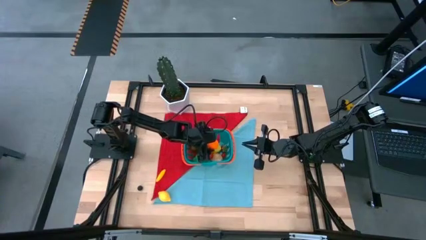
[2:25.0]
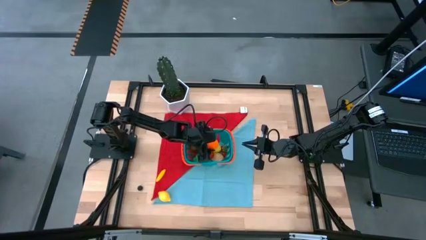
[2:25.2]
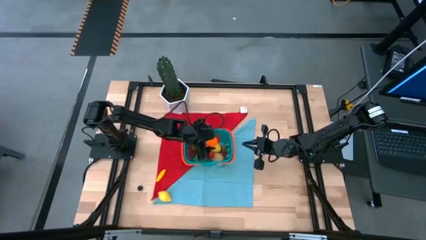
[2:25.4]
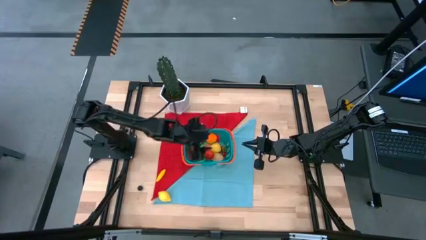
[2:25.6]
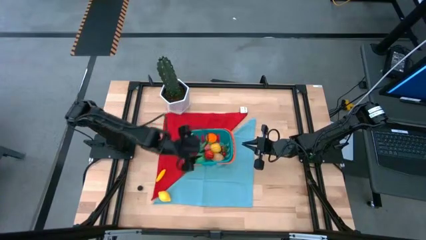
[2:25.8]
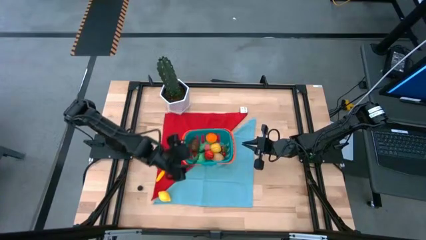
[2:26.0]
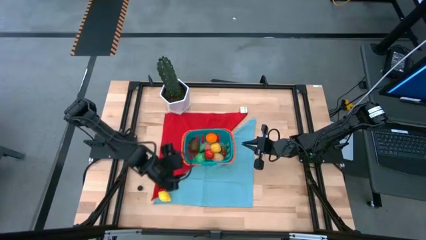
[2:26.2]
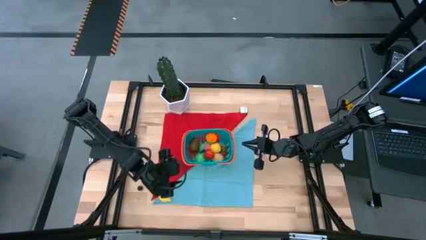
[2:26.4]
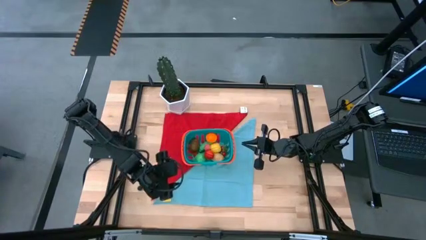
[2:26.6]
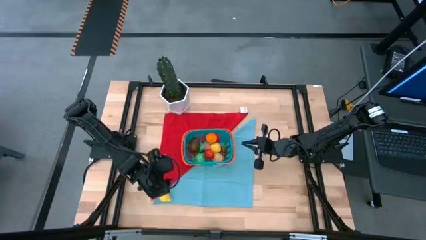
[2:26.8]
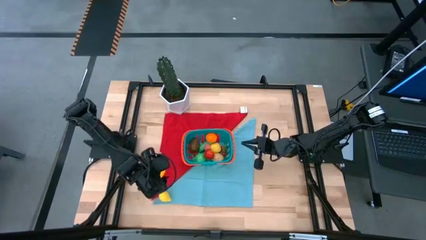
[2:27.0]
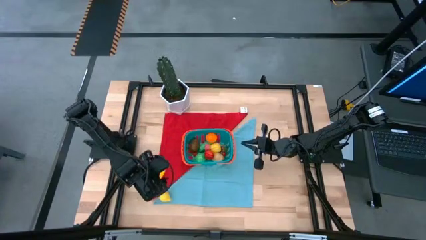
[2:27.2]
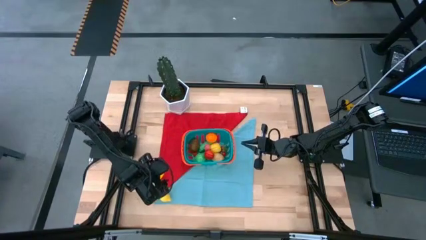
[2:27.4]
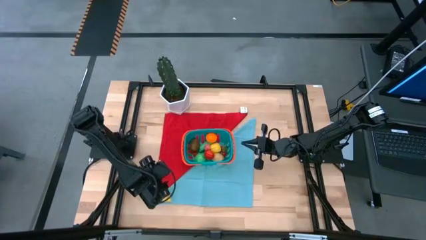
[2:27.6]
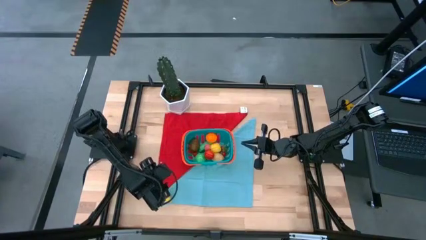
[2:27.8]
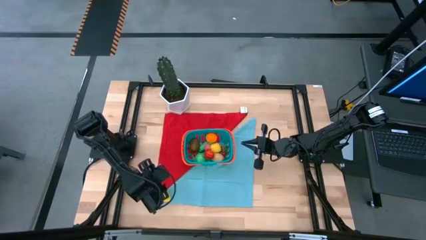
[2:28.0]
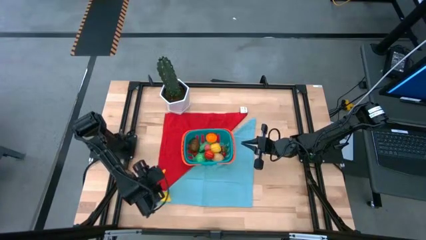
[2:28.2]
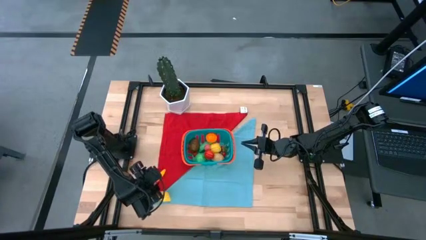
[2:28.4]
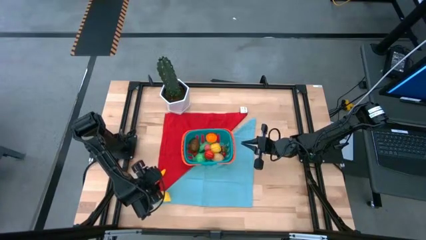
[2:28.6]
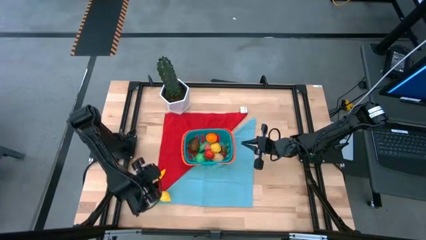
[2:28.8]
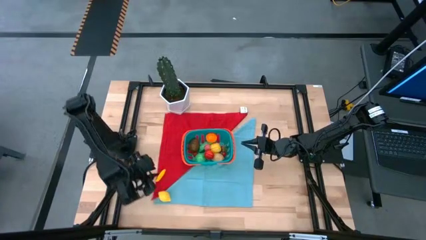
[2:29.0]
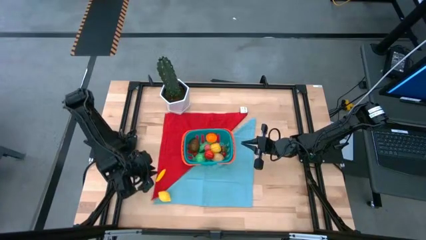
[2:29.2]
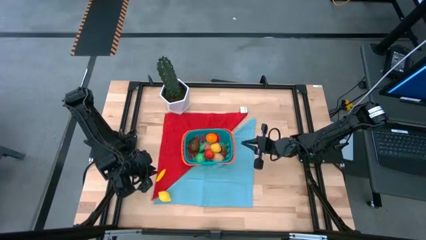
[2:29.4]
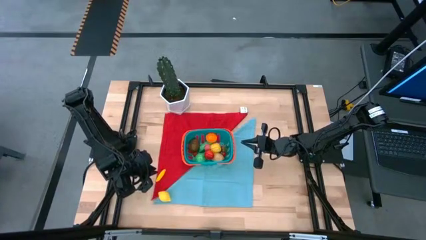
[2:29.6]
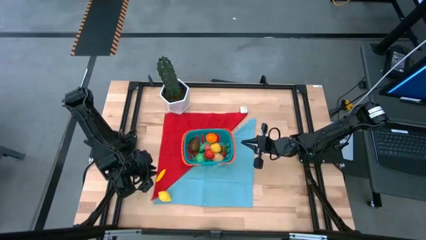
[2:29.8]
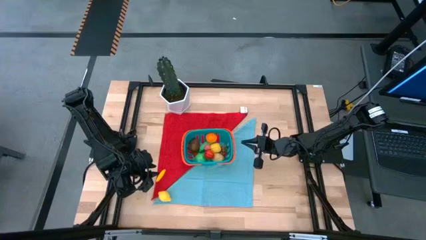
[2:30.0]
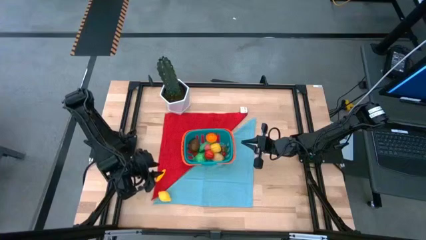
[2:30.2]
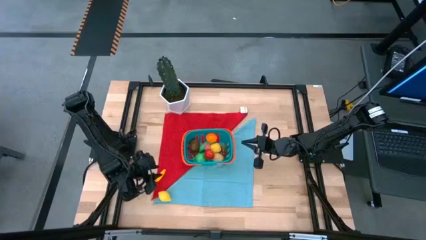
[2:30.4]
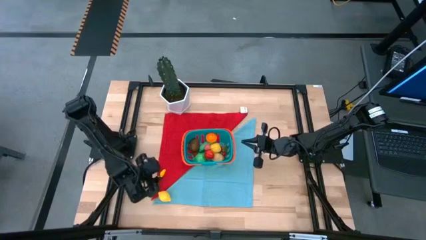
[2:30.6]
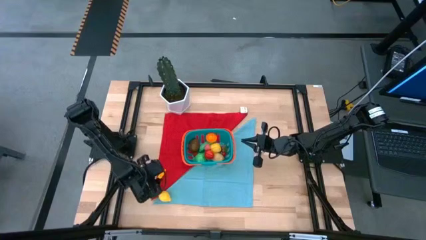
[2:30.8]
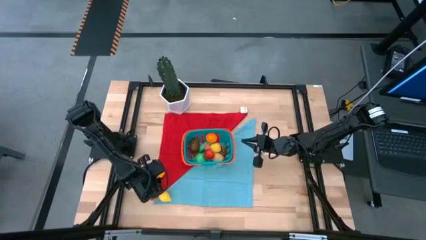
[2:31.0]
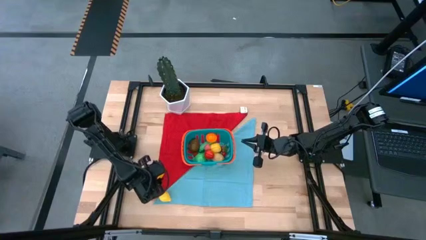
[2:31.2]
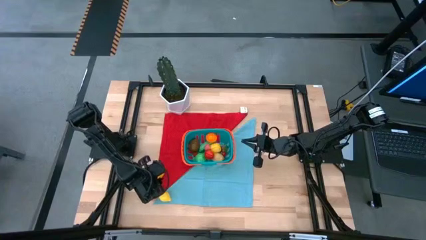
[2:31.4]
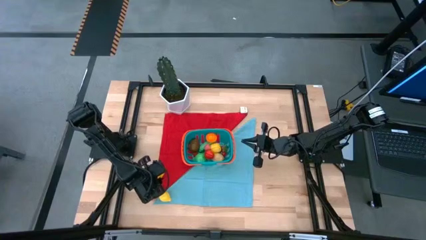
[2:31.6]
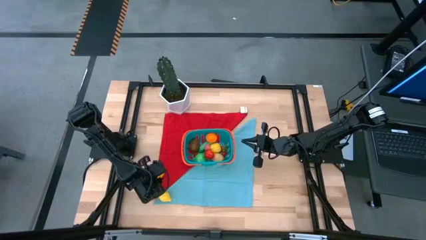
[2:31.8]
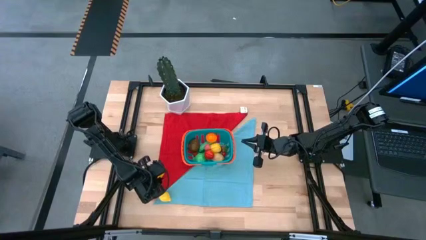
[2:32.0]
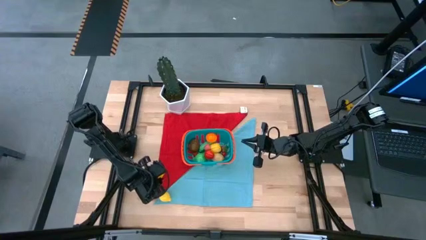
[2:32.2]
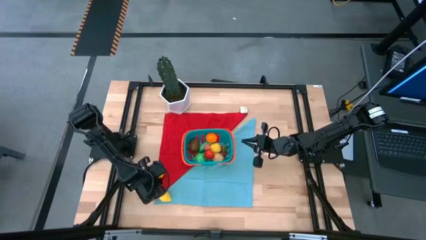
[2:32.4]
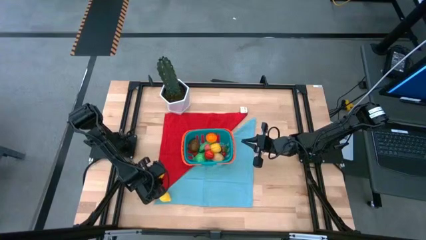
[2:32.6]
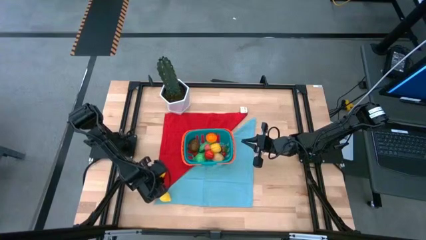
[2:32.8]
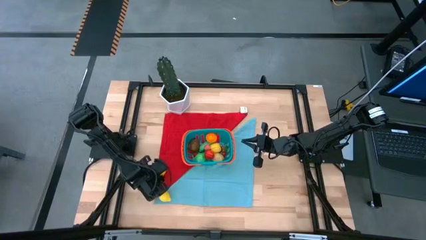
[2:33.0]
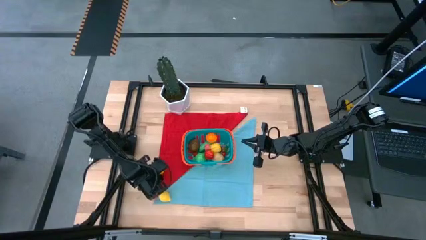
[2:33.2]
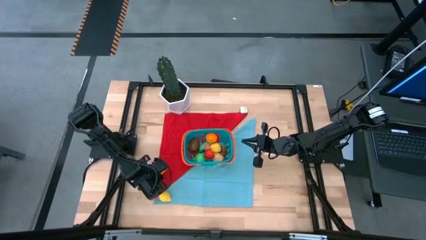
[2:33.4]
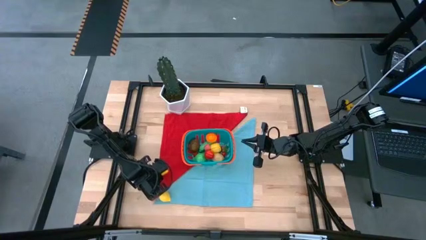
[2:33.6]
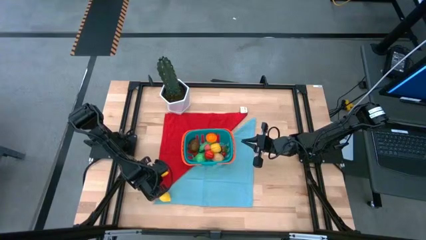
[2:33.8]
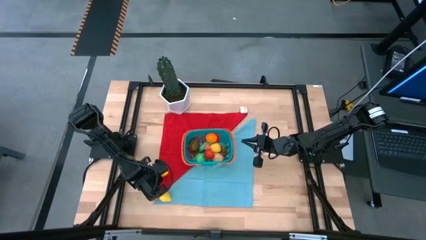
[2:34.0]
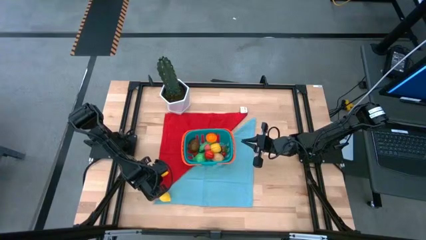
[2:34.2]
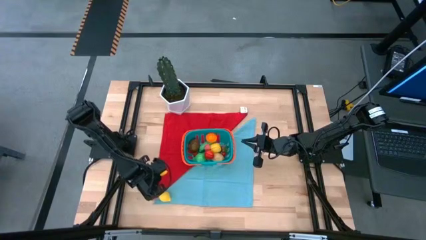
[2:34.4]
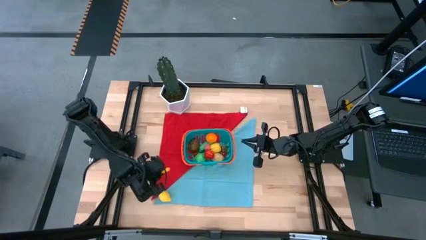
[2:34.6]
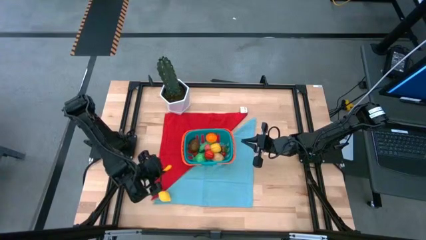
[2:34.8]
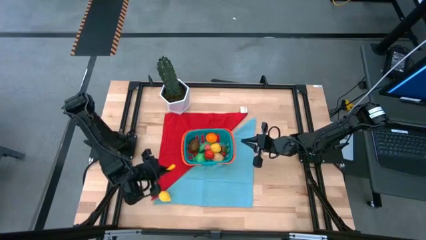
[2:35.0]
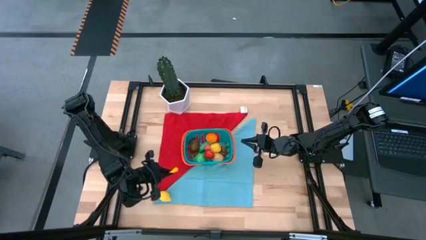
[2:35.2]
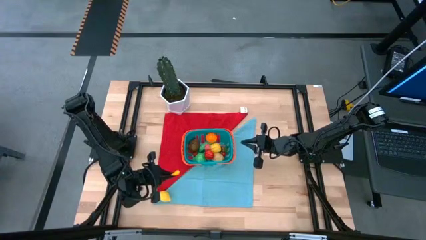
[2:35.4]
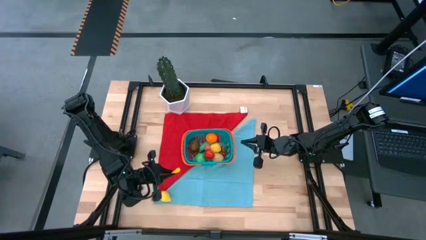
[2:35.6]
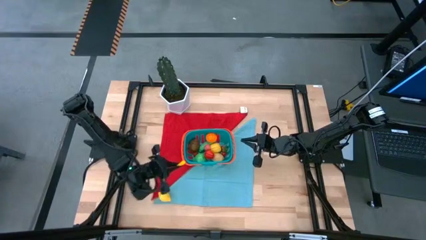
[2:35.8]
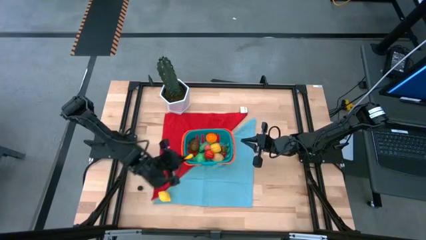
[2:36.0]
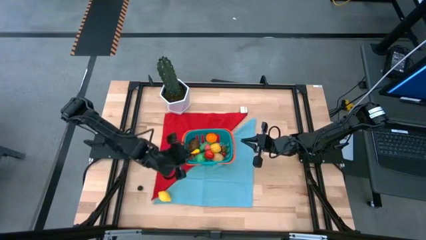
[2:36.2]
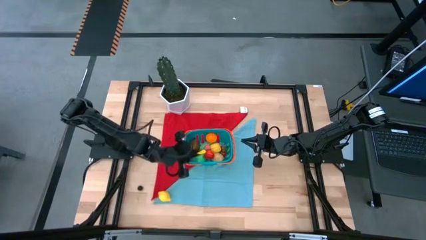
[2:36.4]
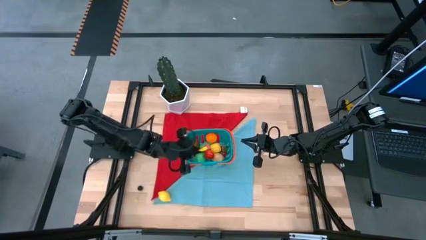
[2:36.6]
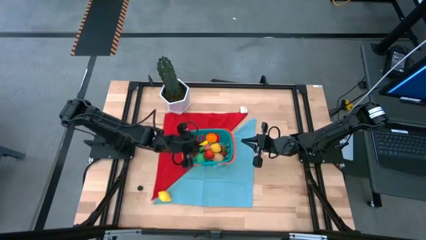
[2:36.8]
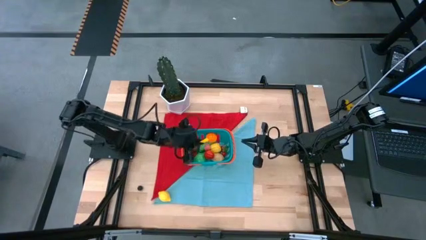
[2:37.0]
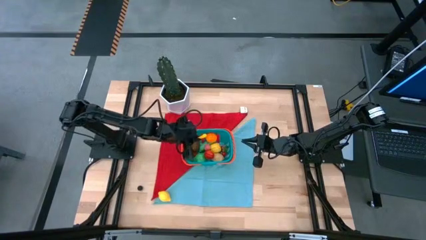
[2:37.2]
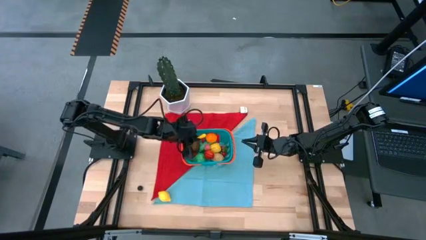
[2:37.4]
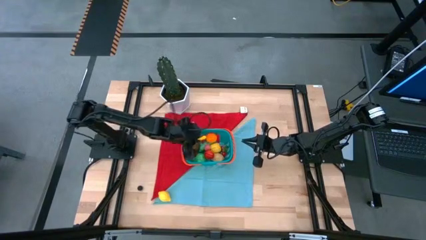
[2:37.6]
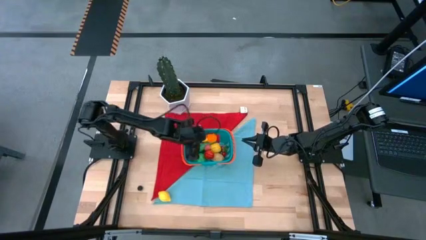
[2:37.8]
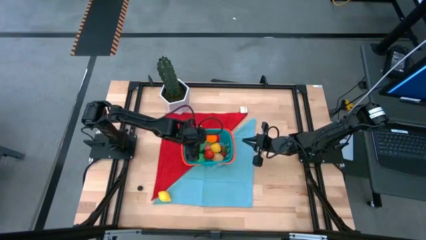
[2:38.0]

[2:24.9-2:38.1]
Task: Build produce basket
Put the yellow corn into the blue basket
